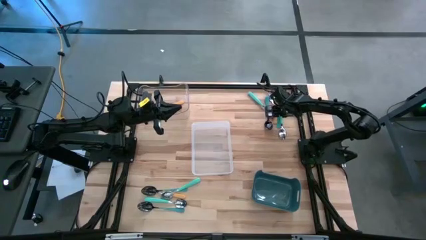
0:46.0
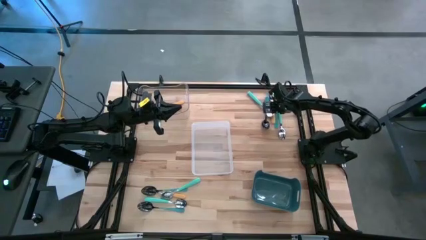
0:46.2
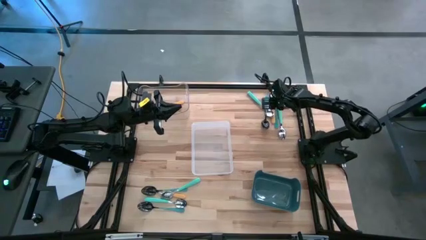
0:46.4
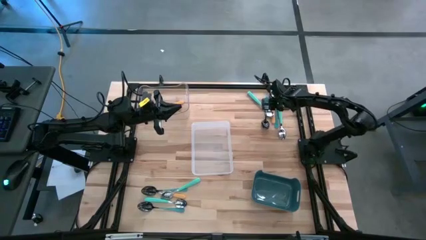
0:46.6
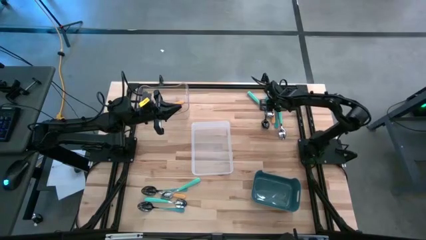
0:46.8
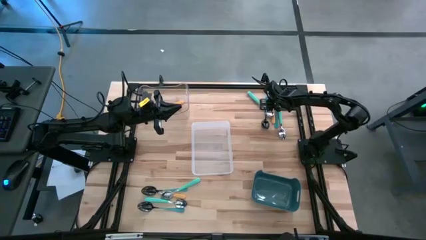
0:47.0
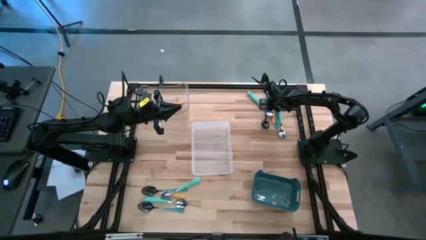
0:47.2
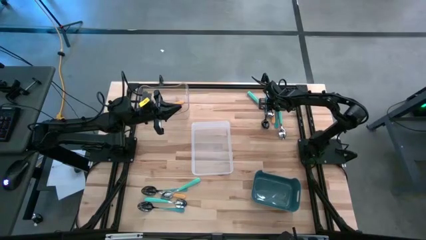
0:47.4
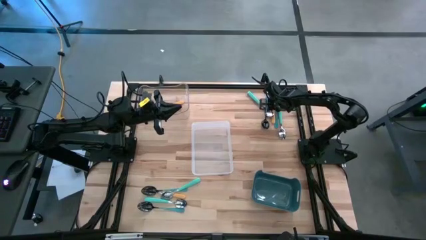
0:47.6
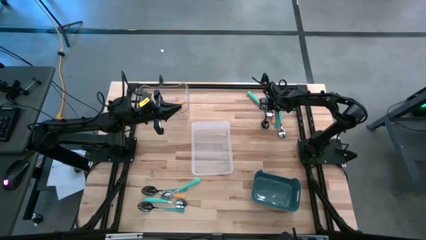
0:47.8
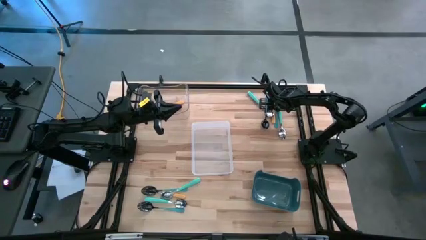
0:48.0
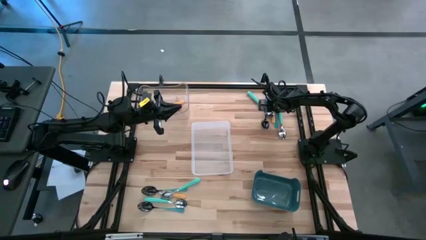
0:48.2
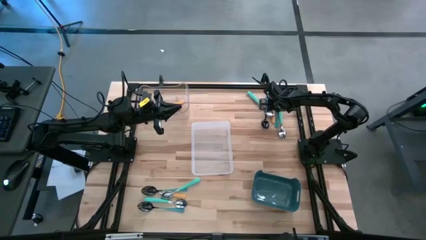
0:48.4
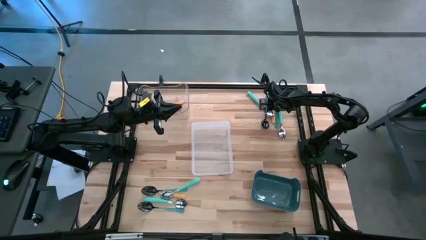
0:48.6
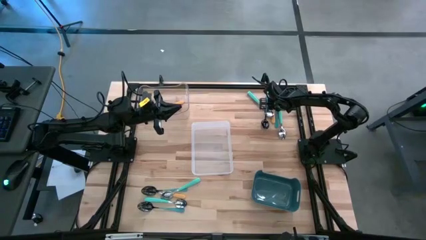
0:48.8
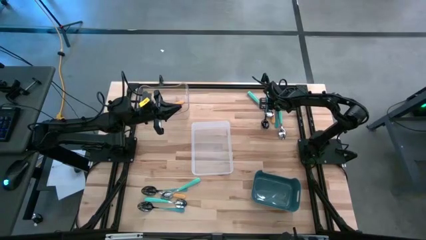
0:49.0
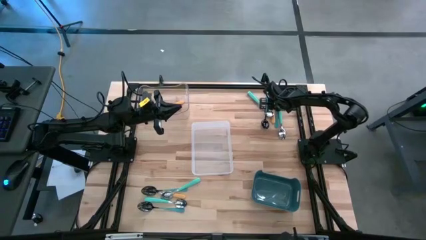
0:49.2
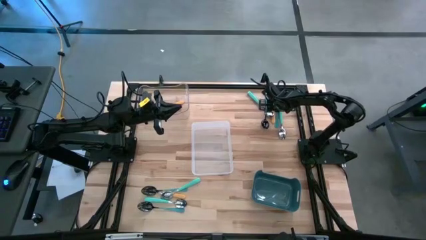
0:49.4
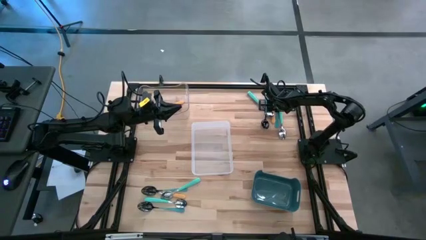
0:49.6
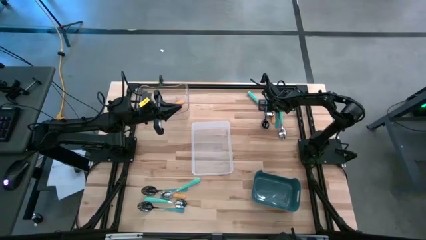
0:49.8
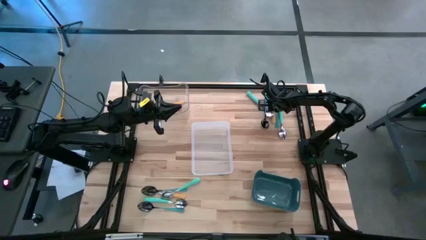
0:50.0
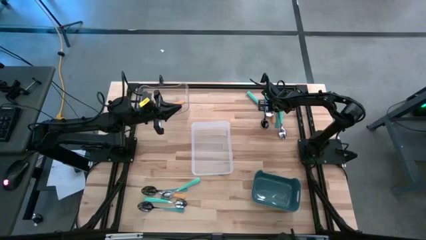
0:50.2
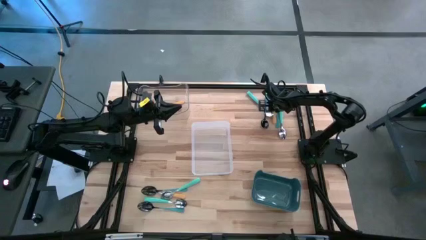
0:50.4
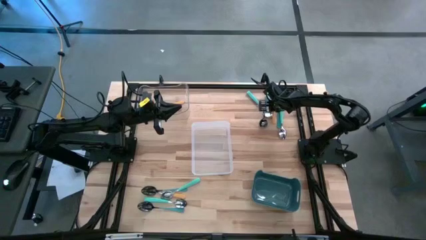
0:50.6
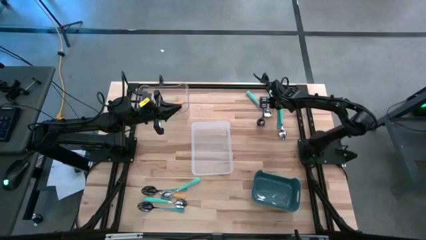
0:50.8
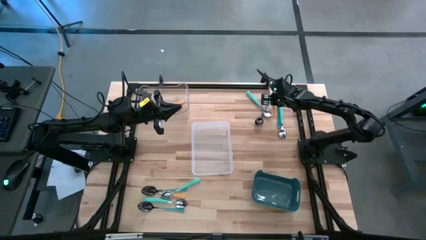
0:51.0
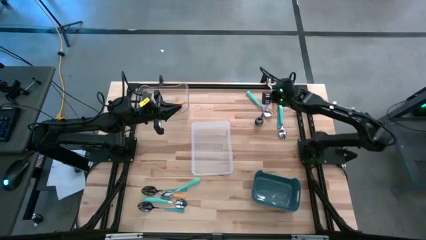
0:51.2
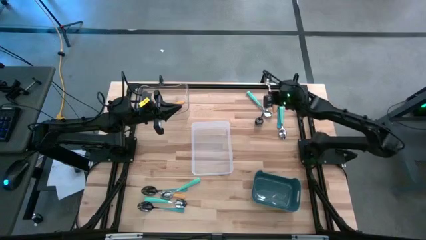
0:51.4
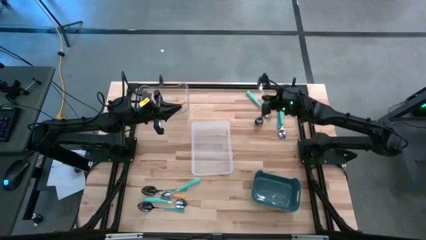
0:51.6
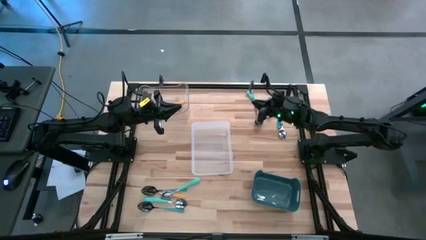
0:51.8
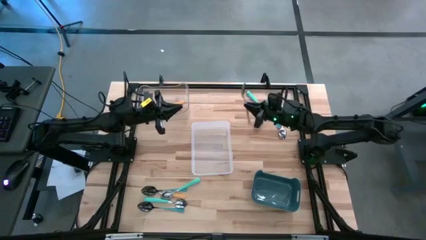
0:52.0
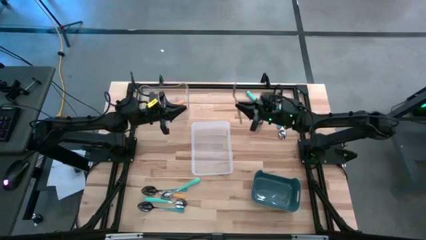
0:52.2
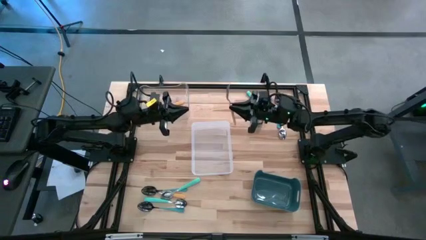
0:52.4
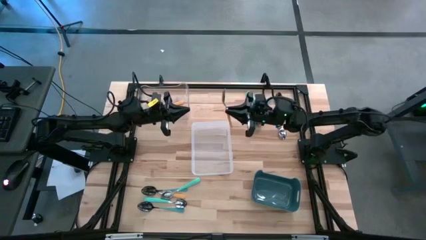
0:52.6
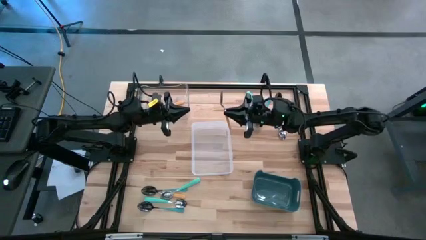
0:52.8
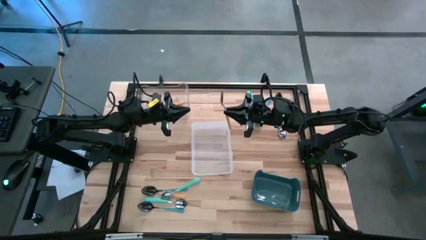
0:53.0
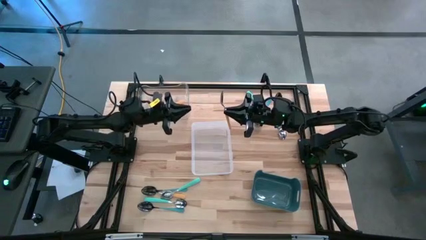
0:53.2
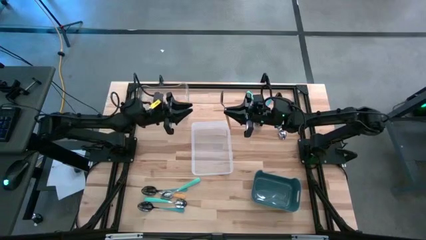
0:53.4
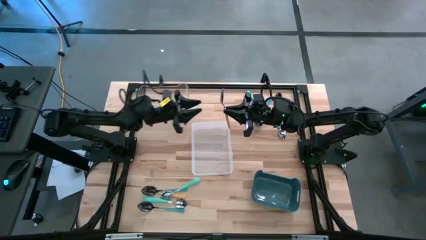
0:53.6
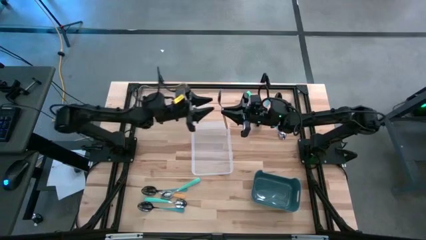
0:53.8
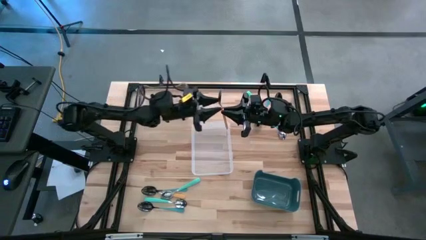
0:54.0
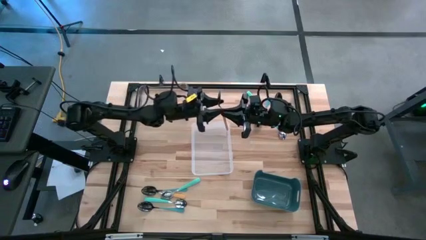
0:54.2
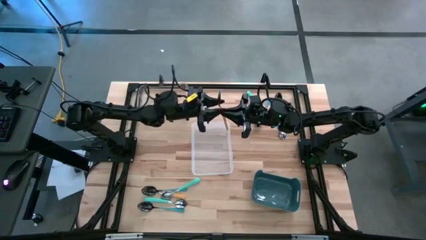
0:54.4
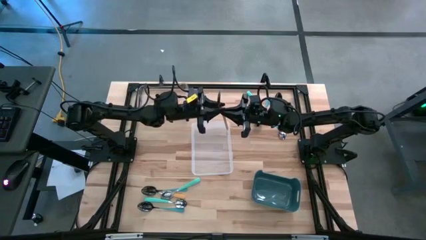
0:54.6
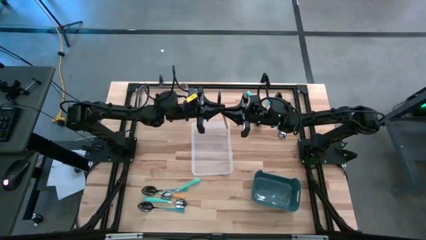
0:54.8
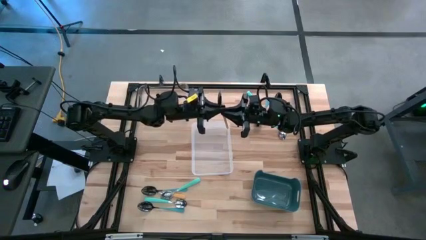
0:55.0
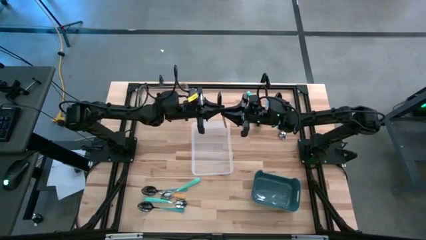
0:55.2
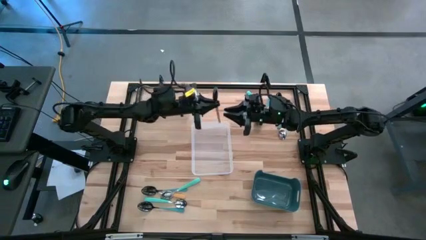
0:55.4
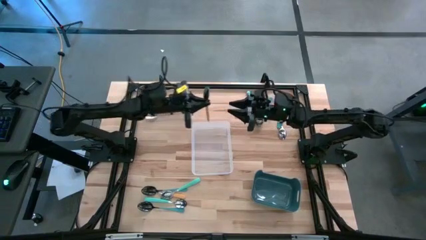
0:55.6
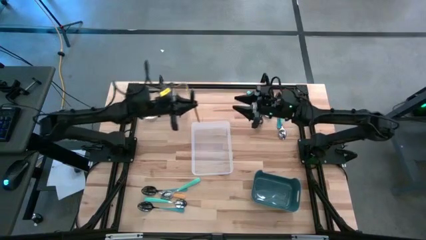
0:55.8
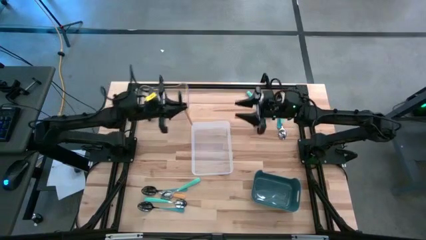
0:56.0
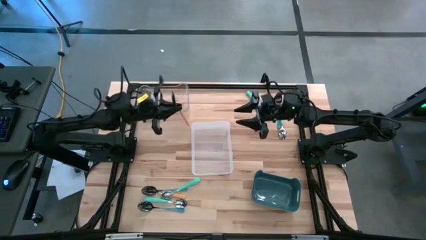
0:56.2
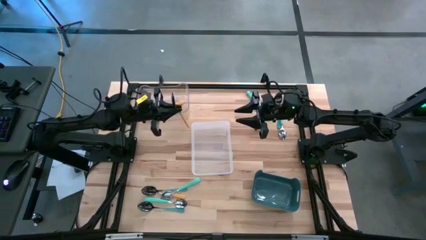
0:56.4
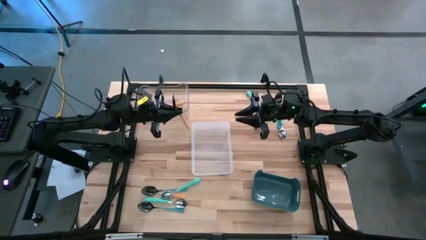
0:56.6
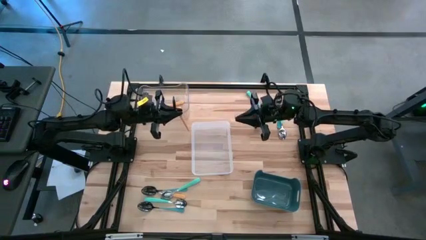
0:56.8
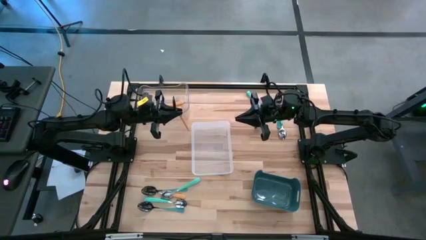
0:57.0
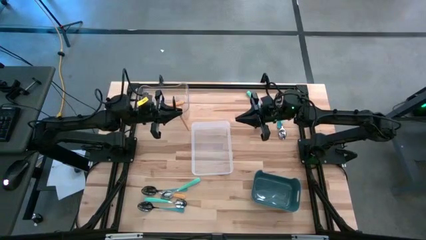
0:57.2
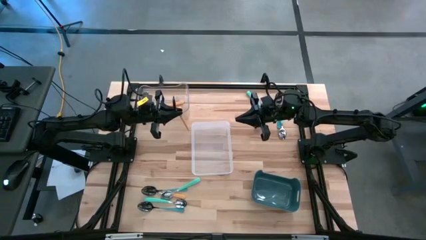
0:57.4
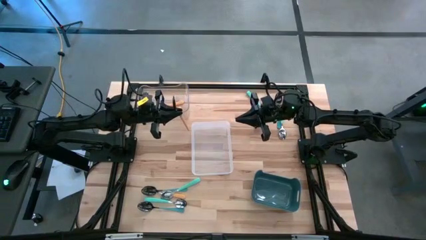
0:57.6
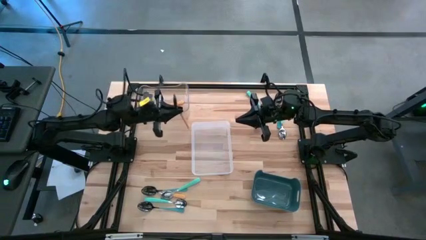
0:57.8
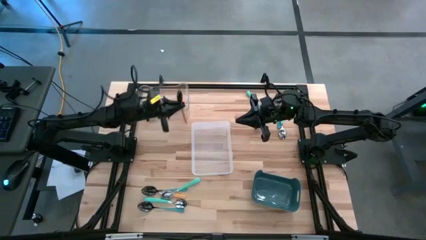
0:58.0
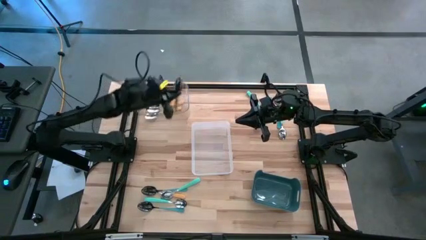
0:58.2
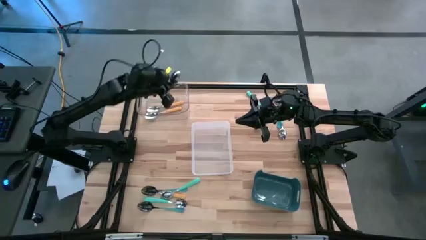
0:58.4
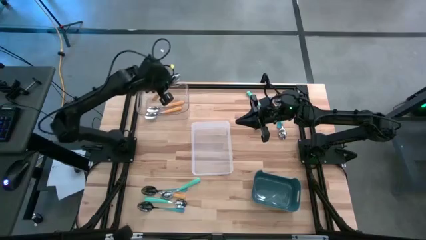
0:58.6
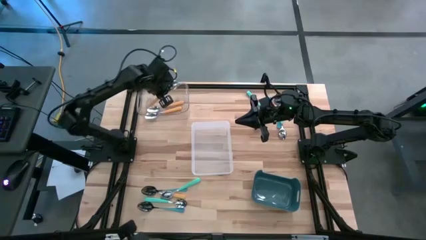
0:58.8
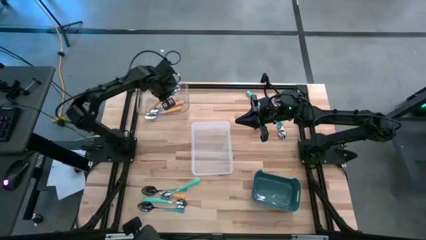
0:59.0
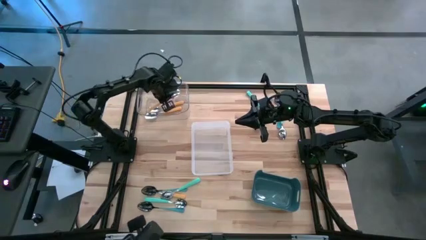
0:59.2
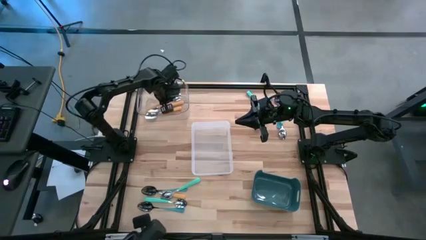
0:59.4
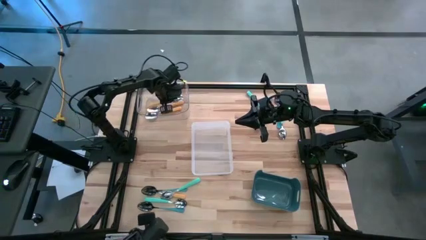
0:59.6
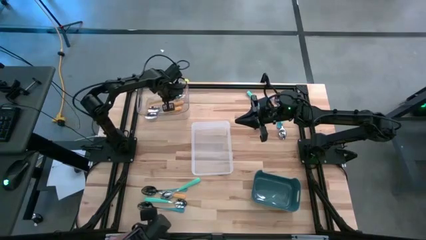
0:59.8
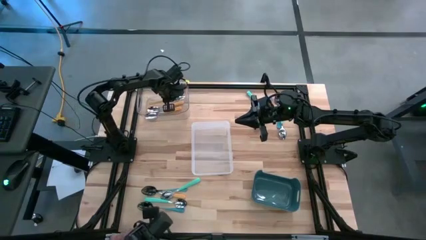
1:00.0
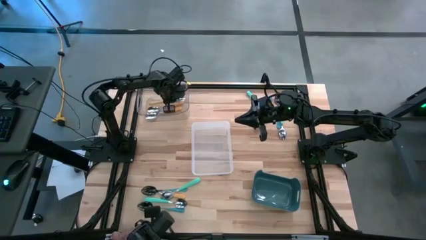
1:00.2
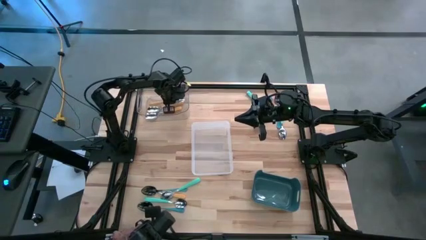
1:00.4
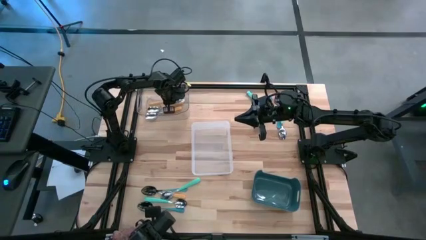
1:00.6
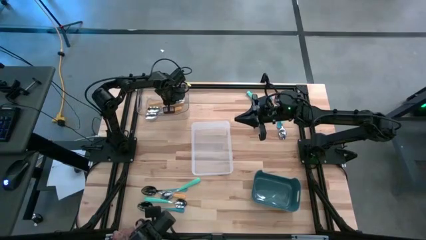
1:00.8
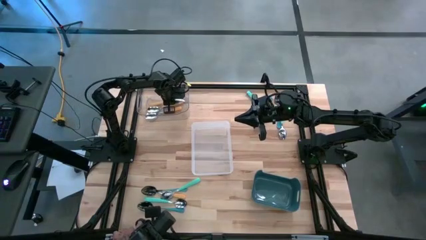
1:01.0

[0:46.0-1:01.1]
Task: Sort silverware by color (type)
Put the yellow spoon into the transparent bin
